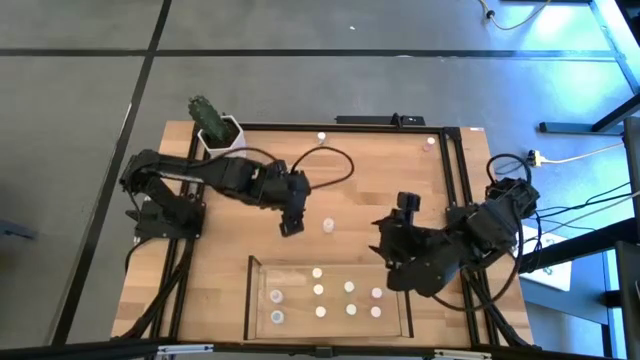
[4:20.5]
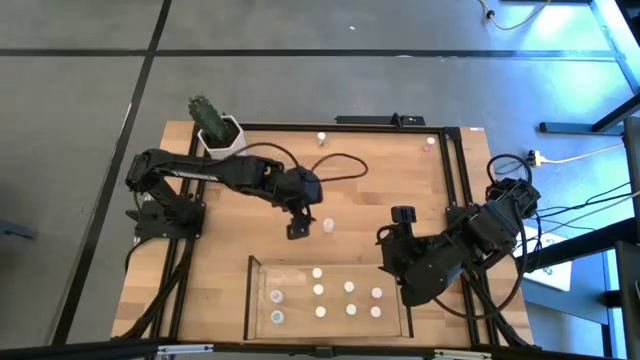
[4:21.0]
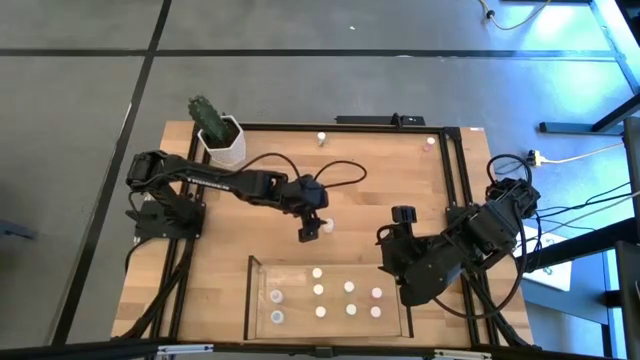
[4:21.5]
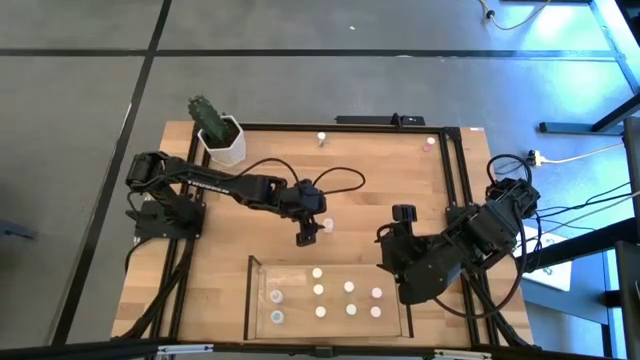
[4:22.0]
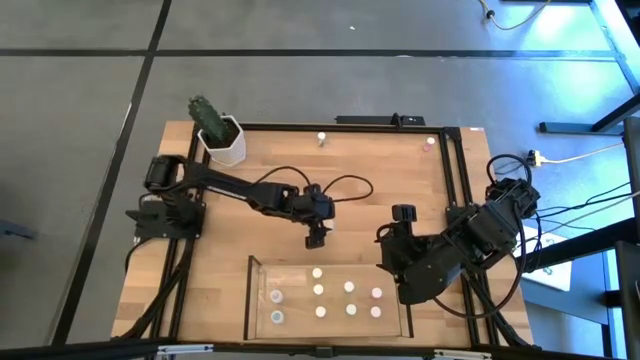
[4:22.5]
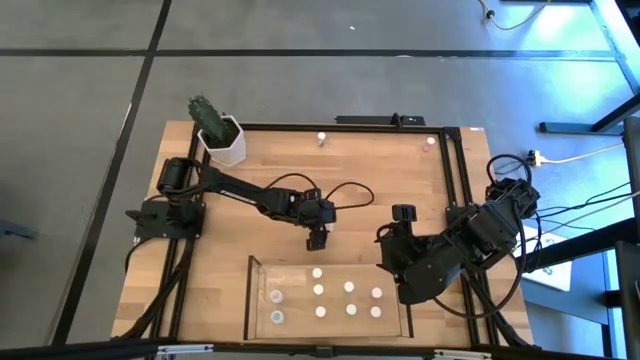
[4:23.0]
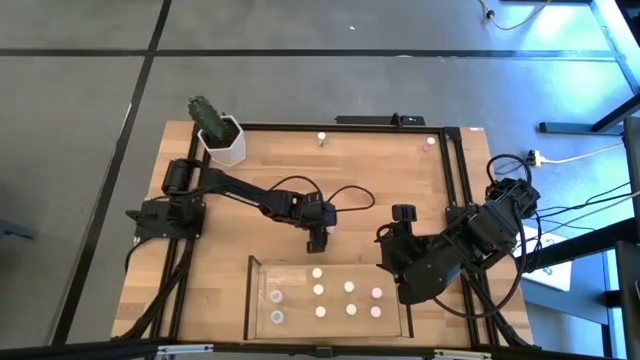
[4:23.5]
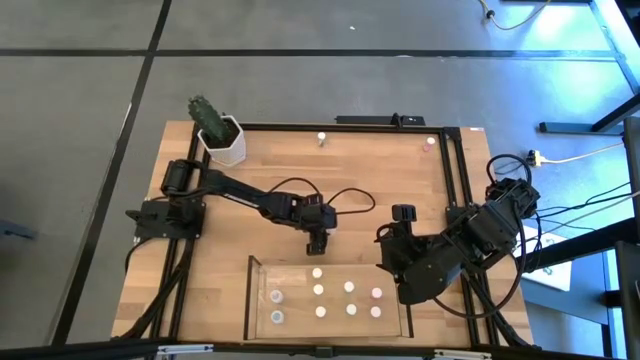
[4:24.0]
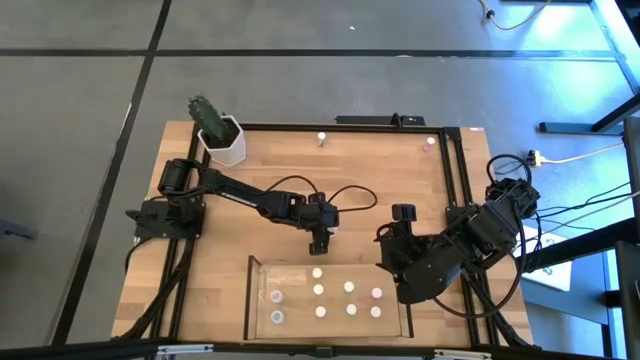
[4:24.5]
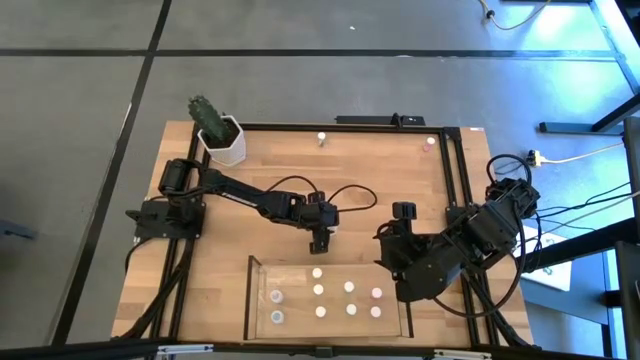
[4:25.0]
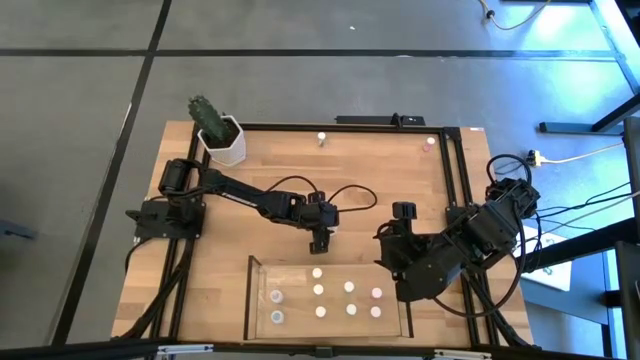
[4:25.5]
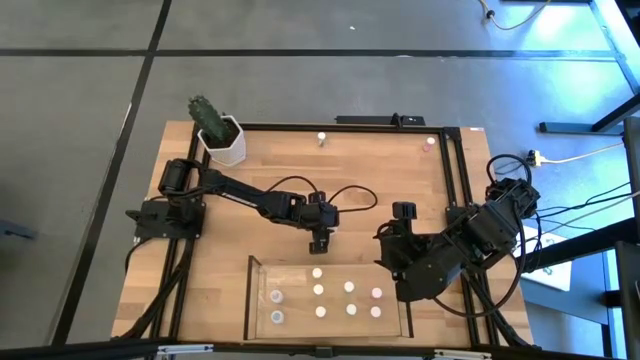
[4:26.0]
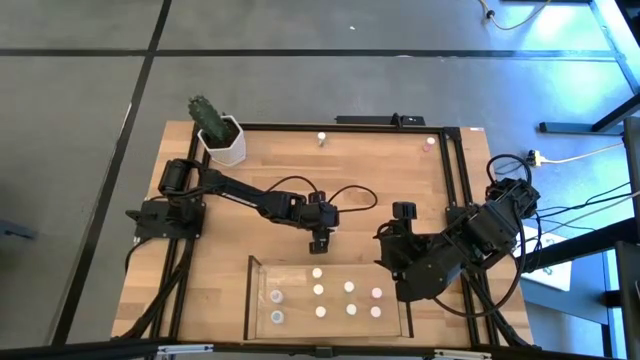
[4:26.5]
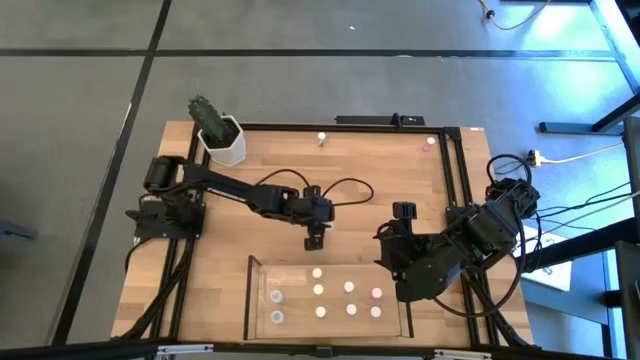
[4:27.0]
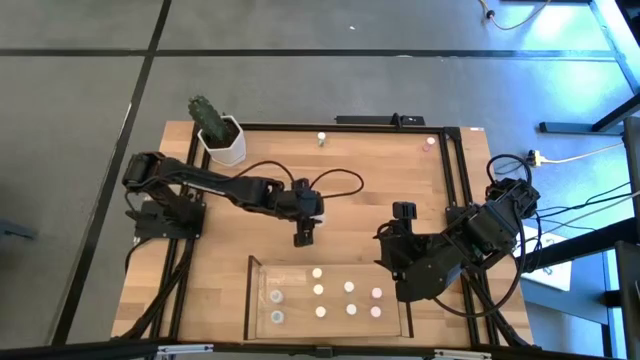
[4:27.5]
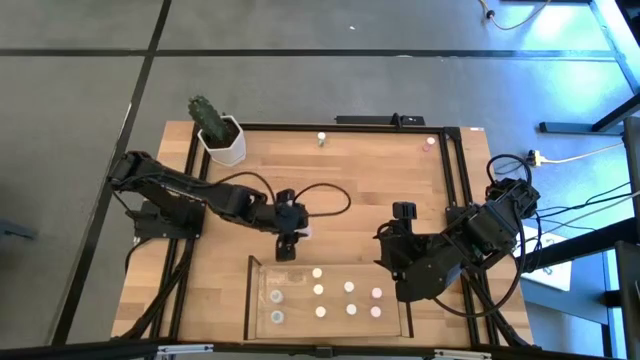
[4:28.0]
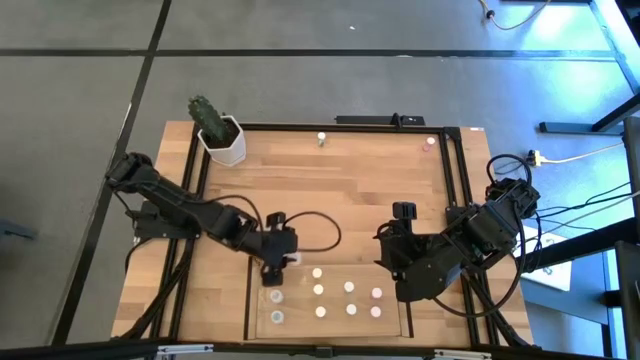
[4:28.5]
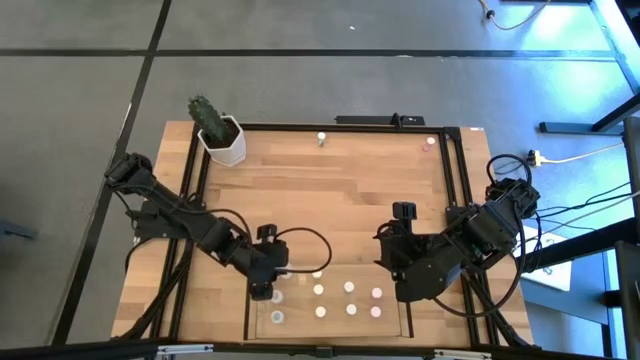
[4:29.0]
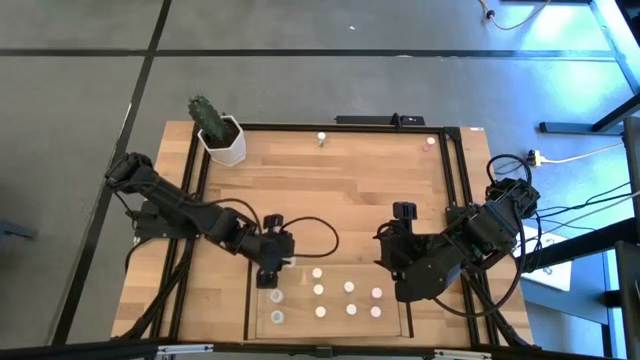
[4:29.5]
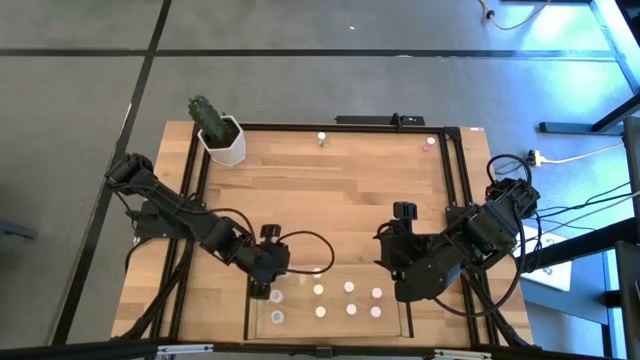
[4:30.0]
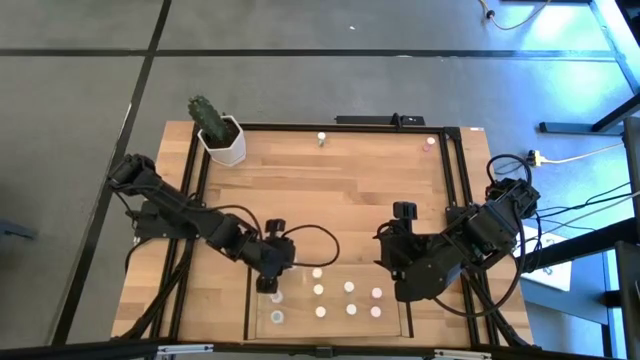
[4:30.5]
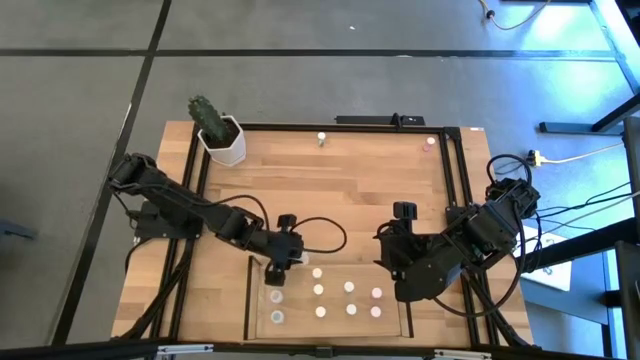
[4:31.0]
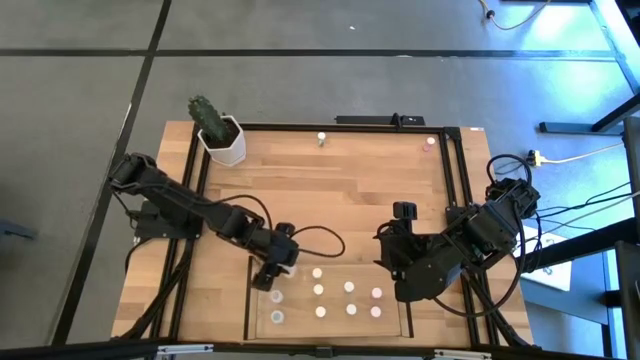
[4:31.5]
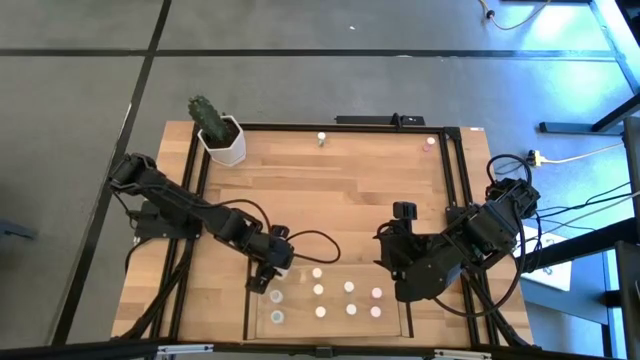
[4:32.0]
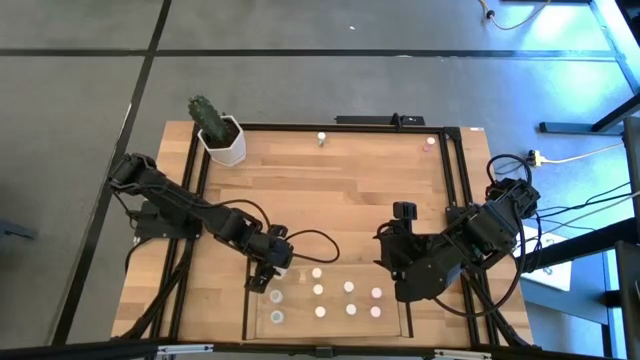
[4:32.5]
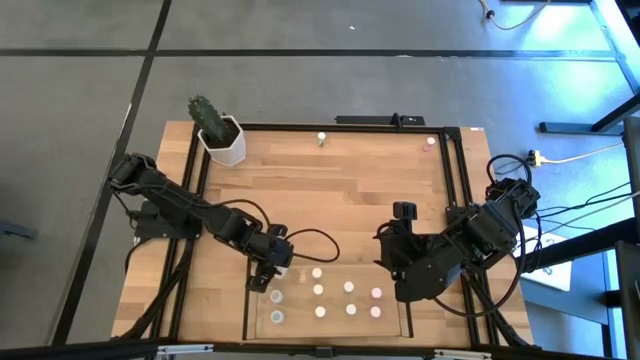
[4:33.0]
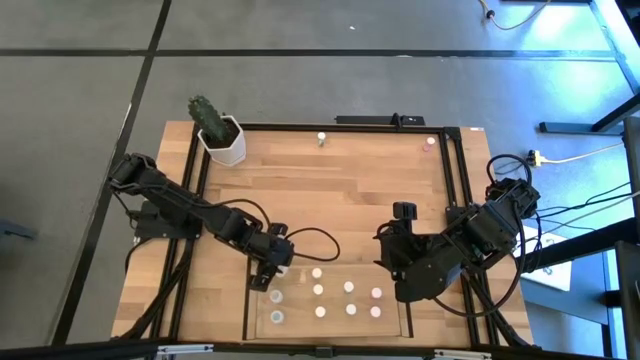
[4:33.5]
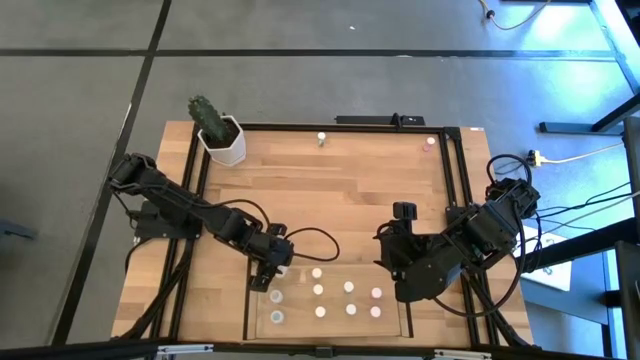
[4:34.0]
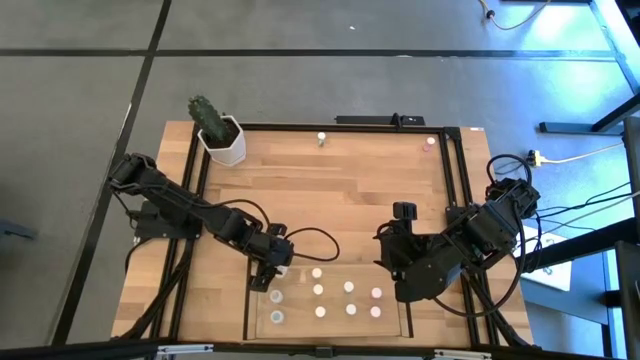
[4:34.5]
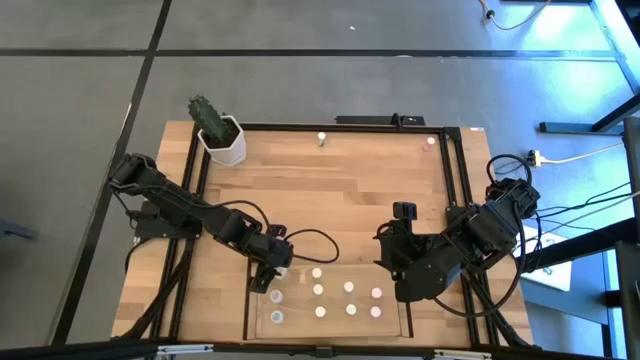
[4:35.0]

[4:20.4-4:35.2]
Task: Pick and place medicine bottles onto shelf by color
Put the white pill bottle on the shelf aligned with the other white pill bottle

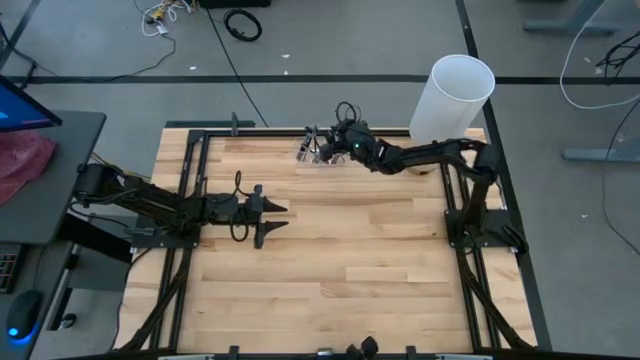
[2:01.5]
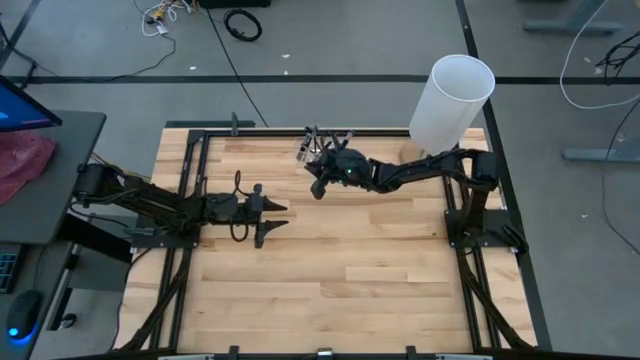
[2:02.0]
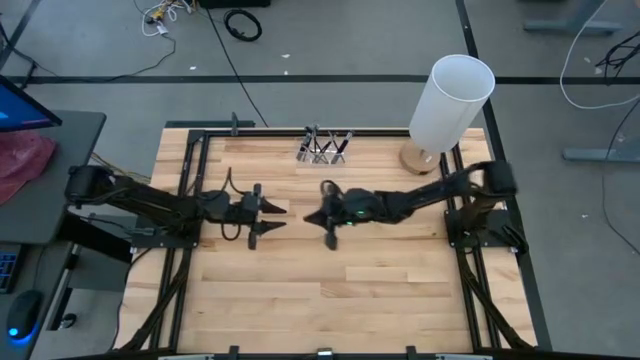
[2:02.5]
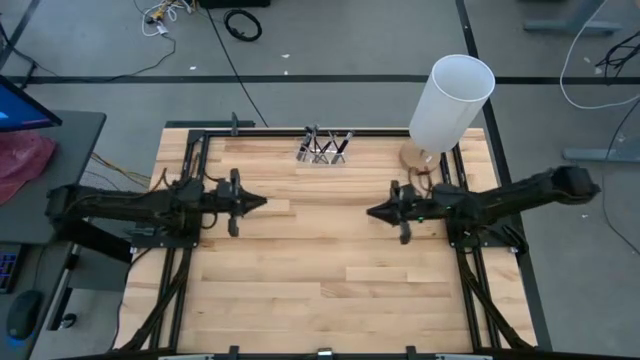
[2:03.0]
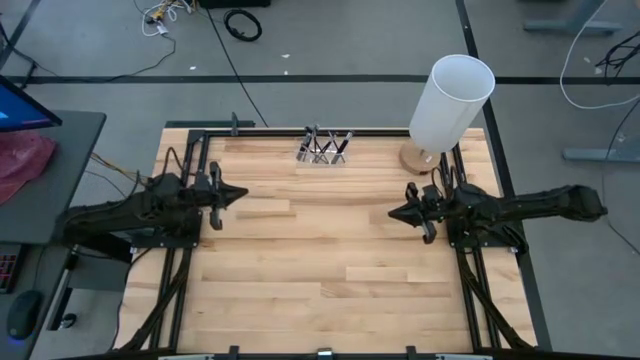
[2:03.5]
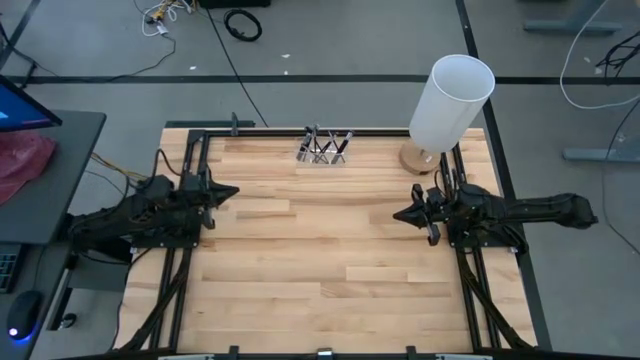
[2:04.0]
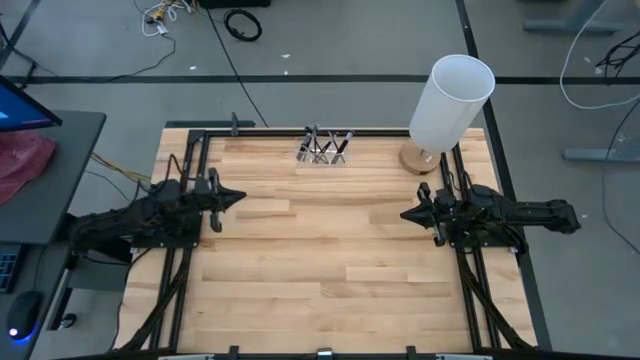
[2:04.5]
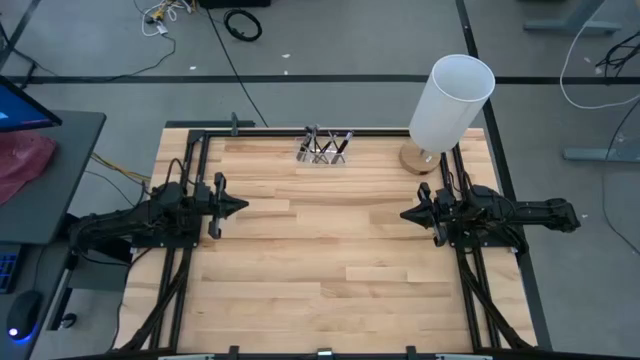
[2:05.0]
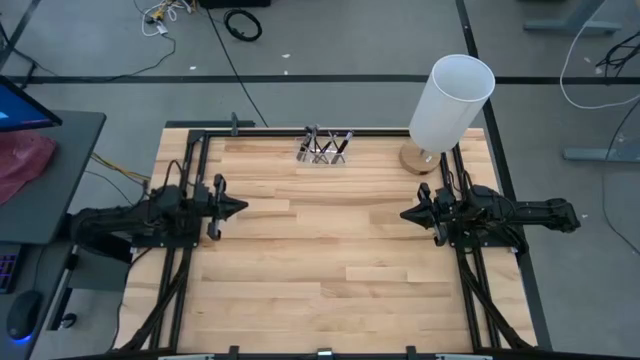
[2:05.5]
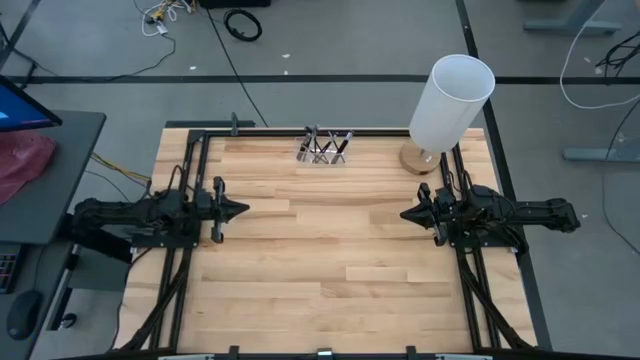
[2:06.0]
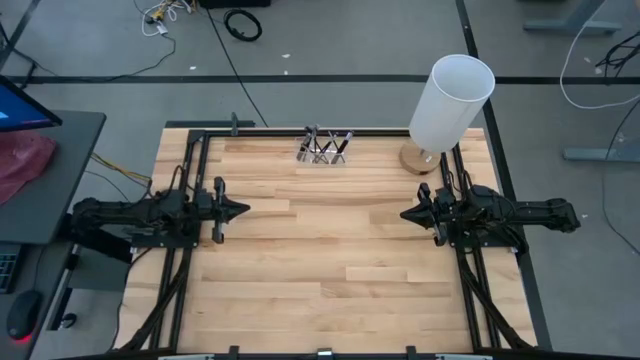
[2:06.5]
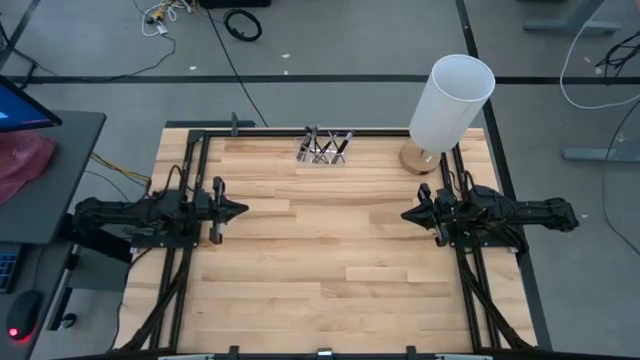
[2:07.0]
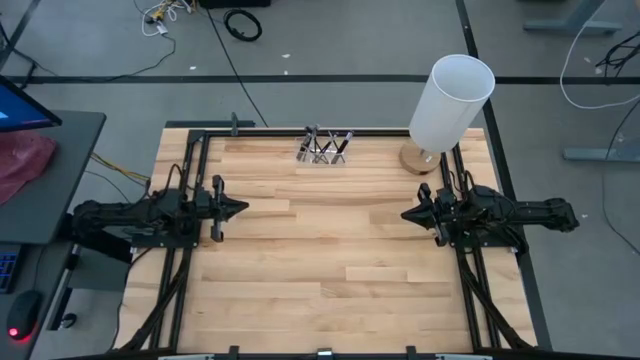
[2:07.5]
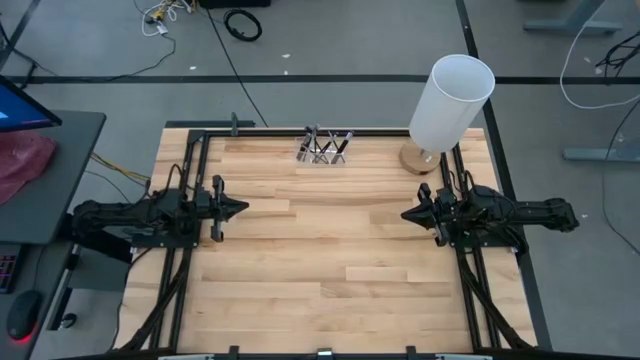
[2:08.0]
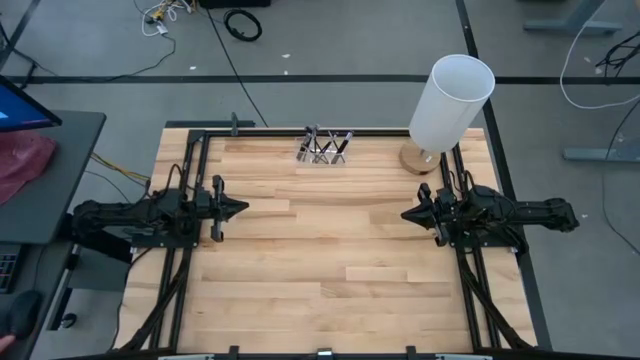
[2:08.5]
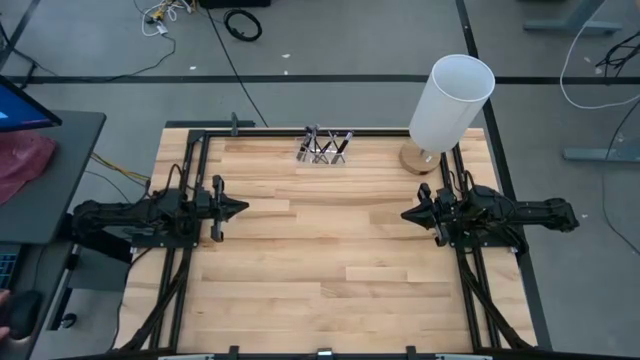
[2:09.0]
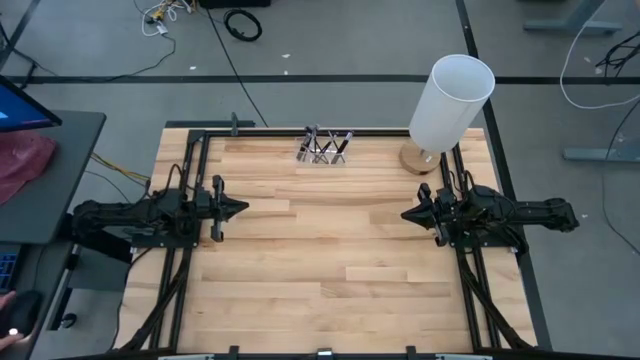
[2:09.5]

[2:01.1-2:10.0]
Task: Pick & Place Makeup Supplies
Return to Home Position
